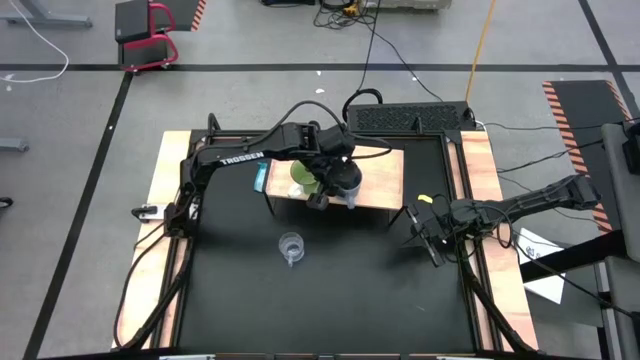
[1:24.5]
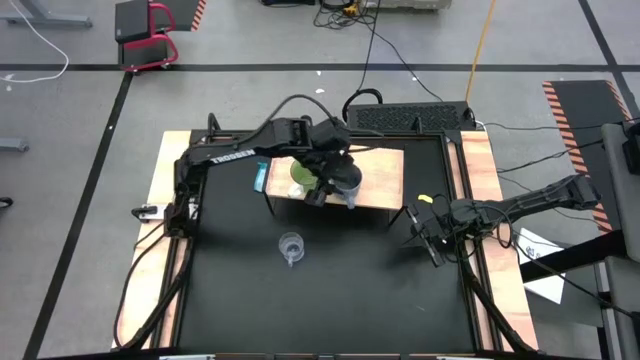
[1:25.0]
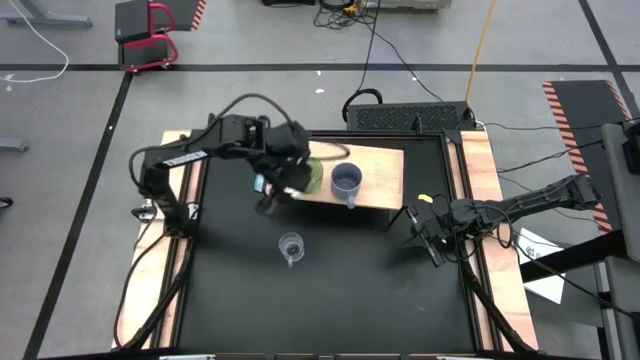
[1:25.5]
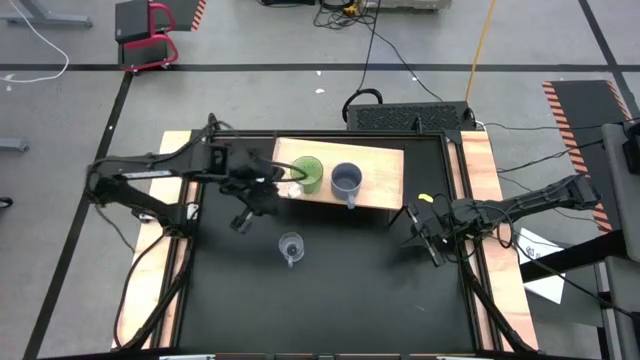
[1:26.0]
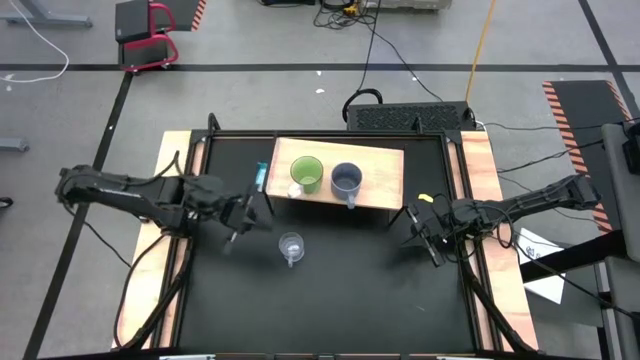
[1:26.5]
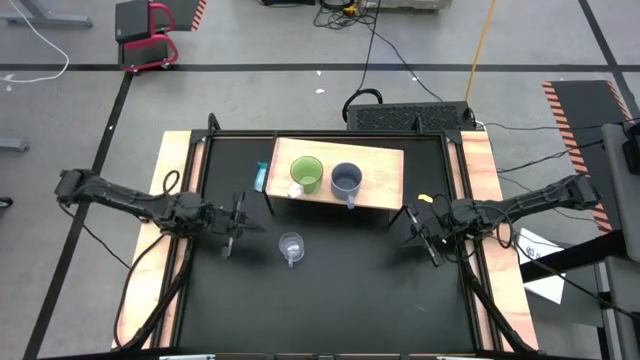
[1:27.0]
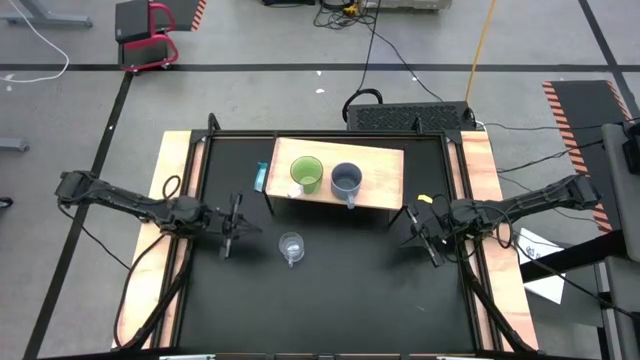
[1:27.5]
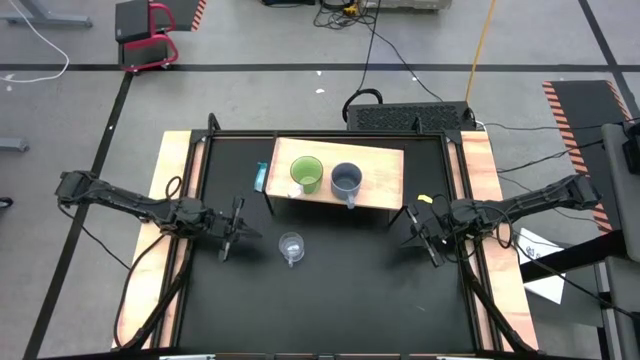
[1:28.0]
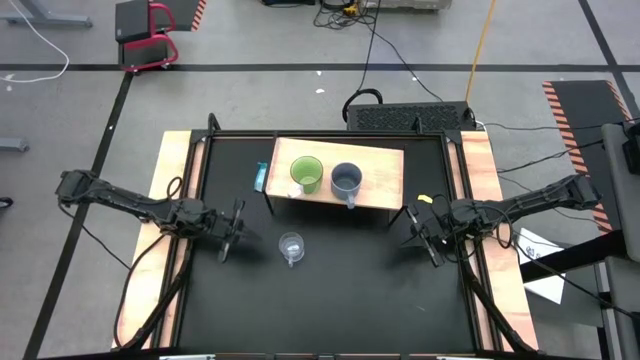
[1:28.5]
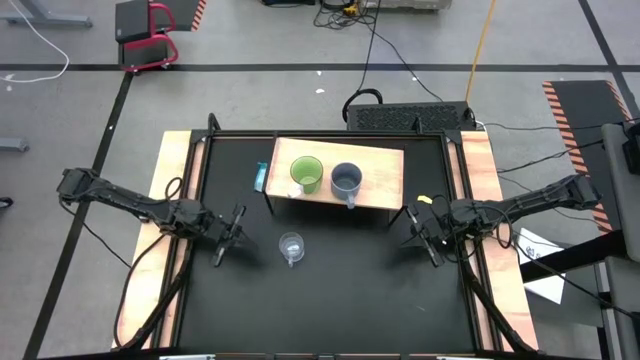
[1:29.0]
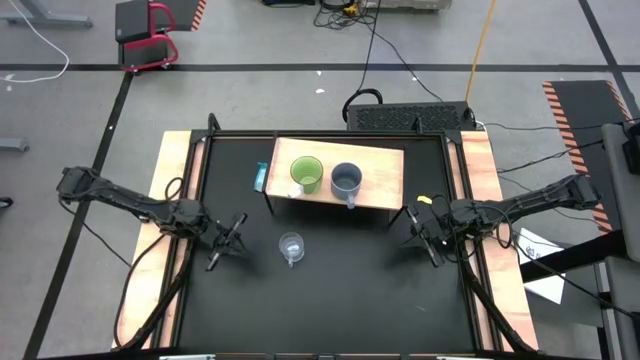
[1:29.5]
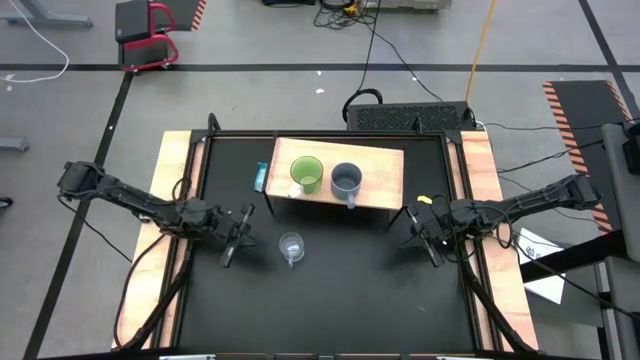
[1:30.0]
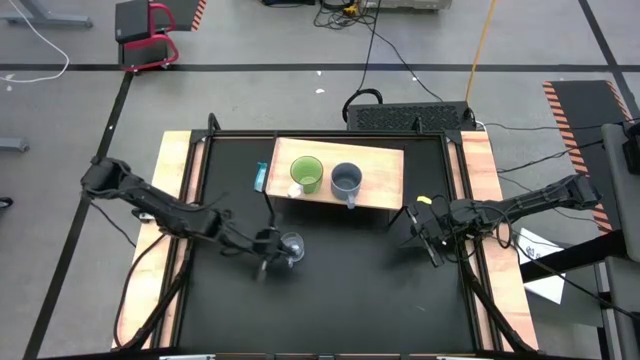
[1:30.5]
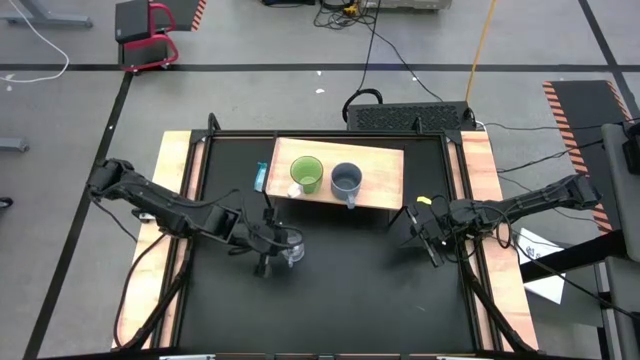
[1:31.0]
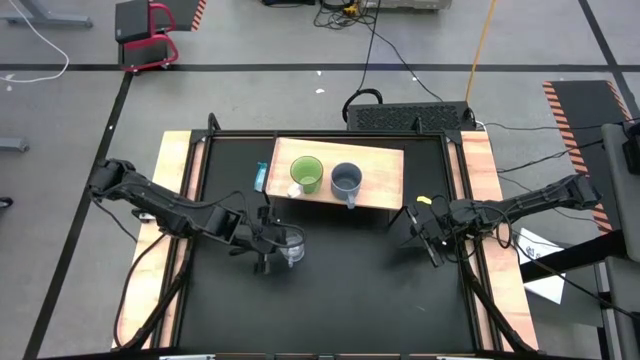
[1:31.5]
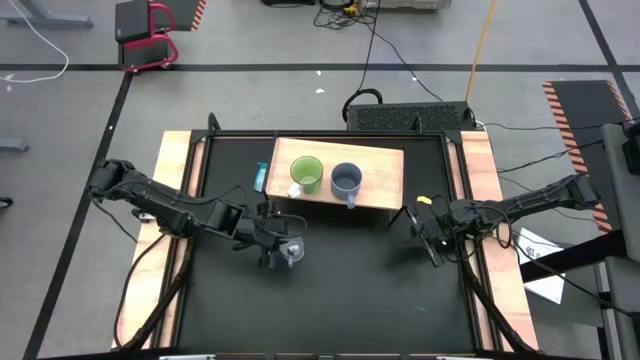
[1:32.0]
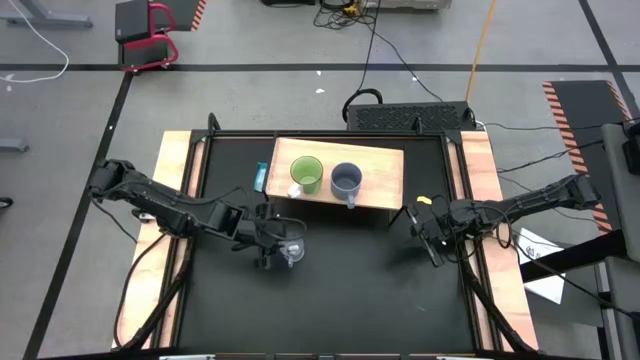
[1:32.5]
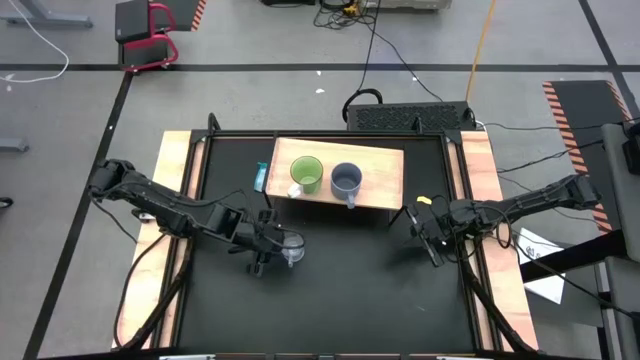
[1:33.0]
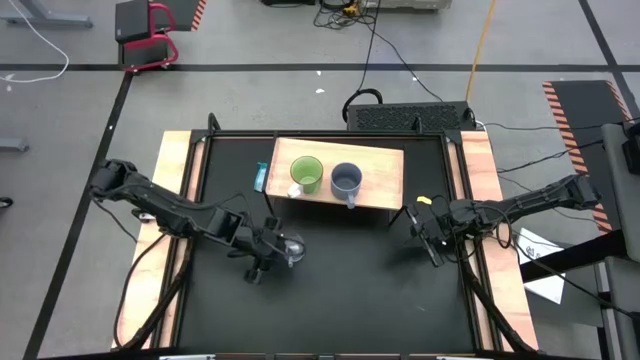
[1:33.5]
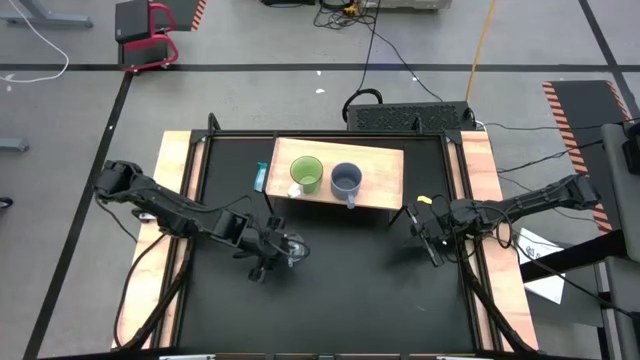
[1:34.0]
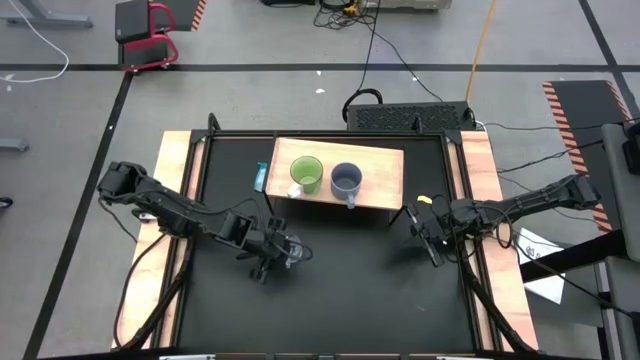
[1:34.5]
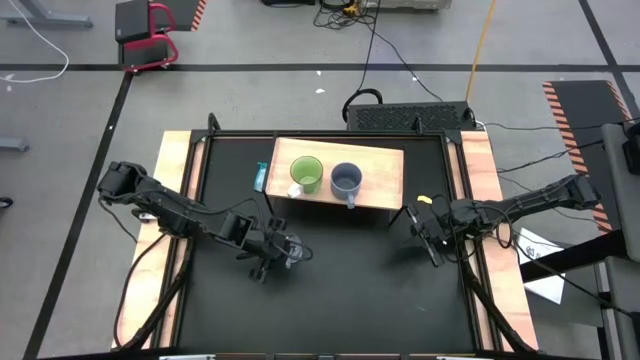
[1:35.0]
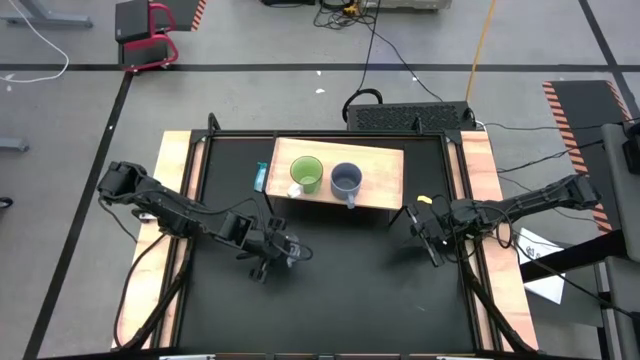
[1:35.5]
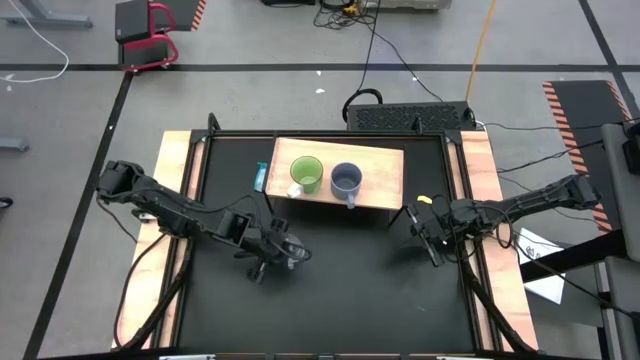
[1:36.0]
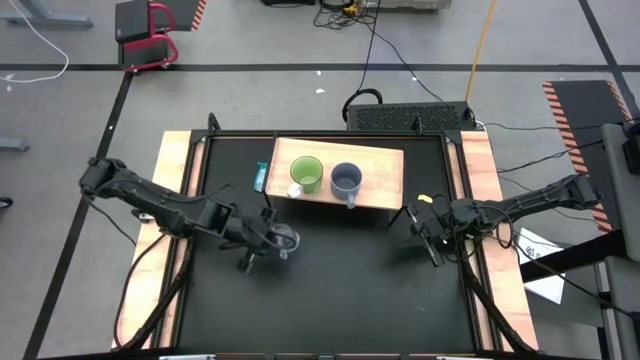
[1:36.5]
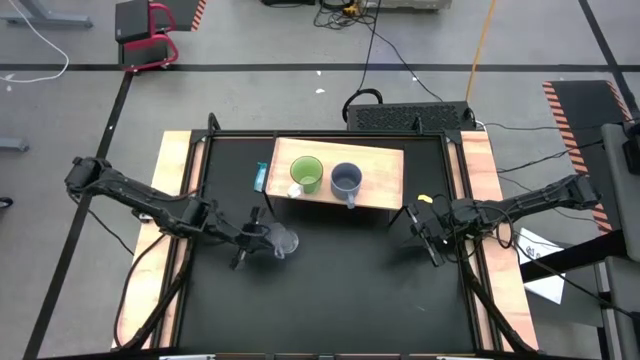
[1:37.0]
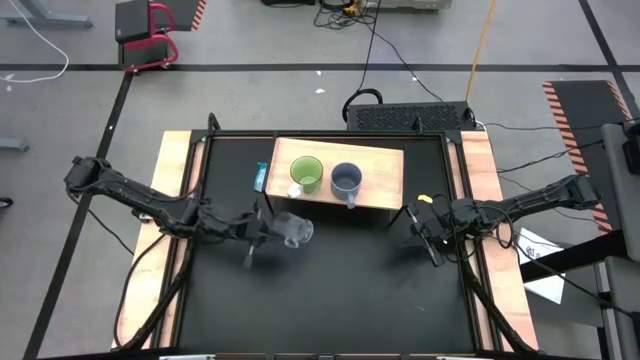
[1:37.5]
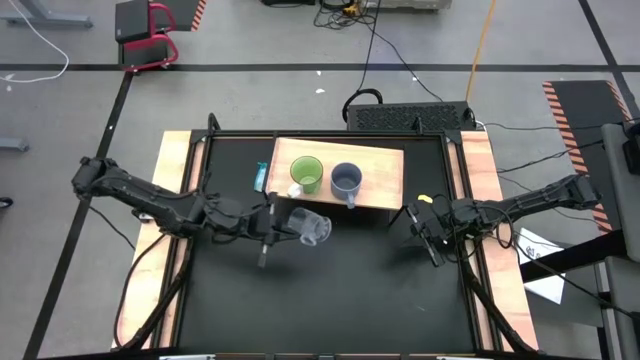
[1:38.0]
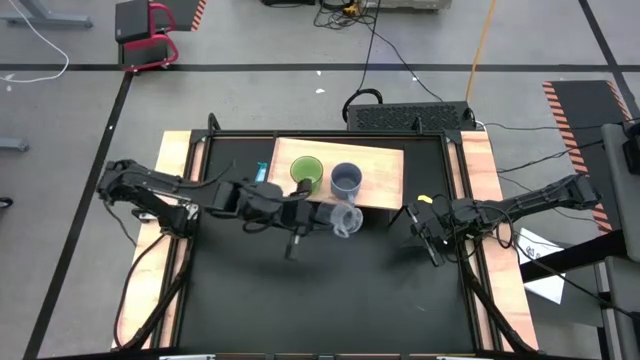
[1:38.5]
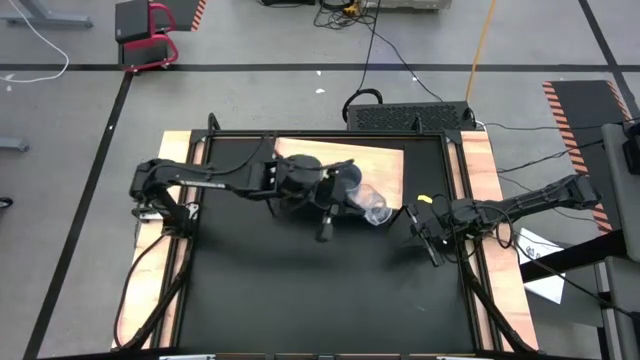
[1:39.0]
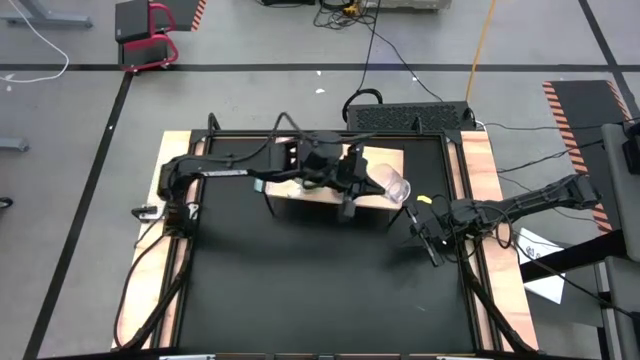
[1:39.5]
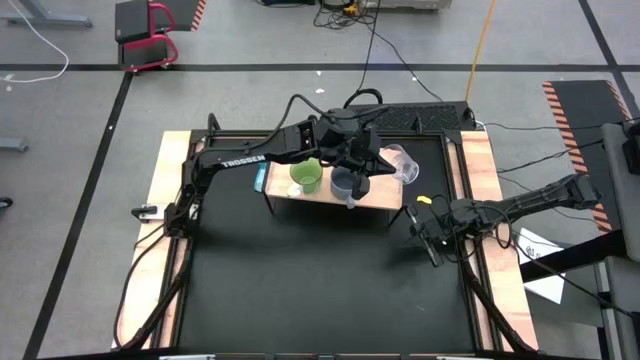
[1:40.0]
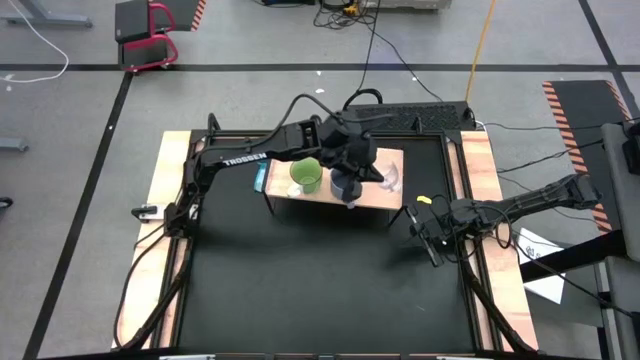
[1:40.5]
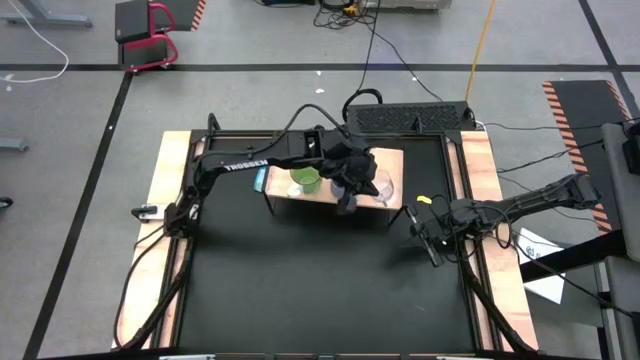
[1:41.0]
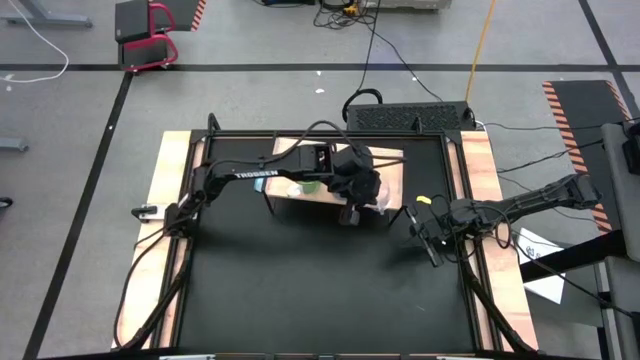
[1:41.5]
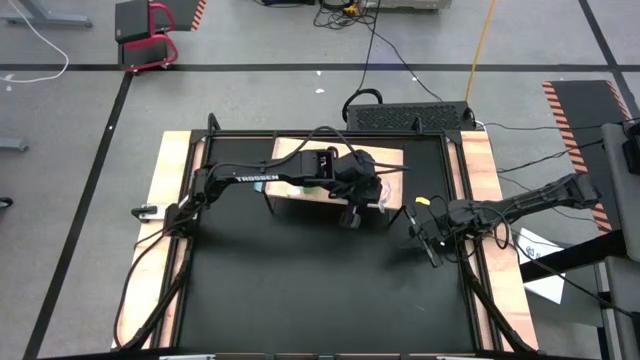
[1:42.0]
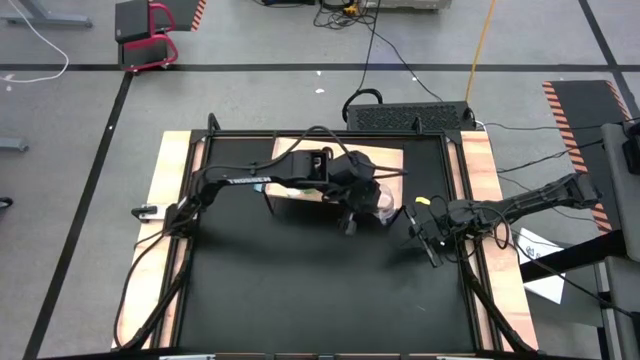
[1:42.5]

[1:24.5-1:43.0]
Task: Stack small to large cups/mugs on shelf
Put the transparent cup on the shelf
